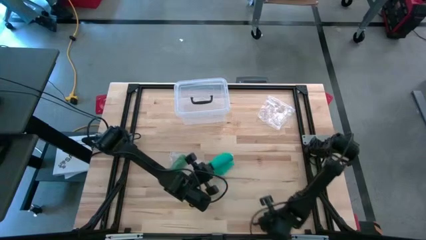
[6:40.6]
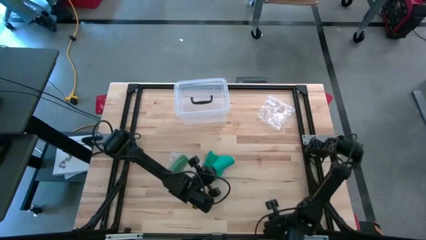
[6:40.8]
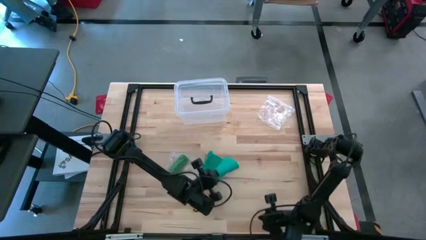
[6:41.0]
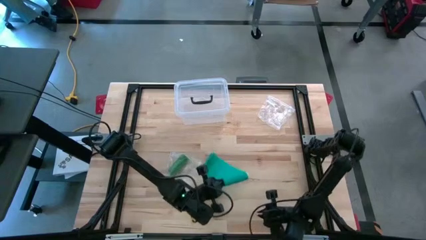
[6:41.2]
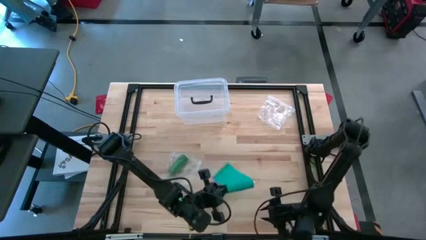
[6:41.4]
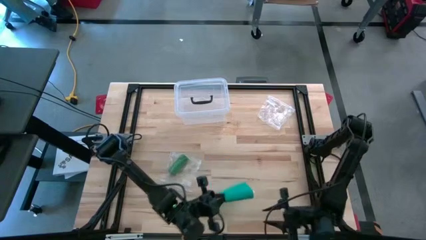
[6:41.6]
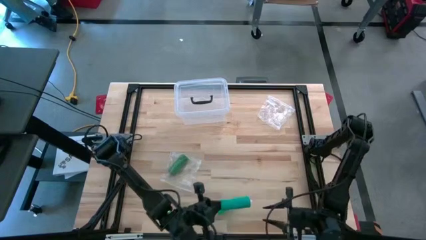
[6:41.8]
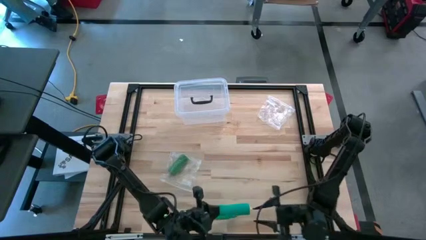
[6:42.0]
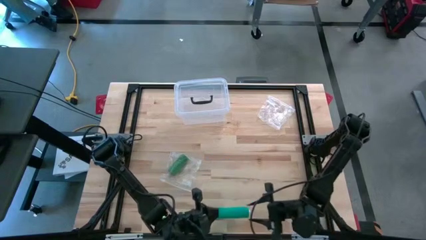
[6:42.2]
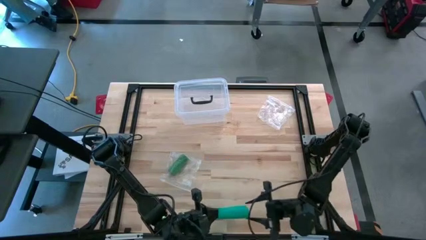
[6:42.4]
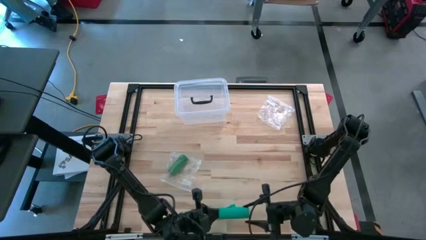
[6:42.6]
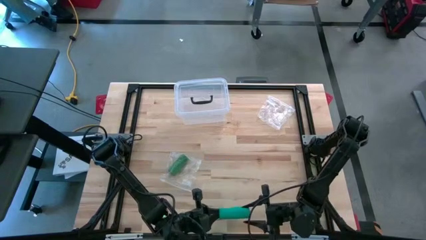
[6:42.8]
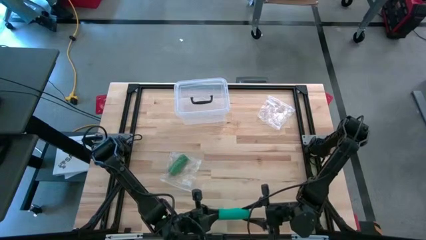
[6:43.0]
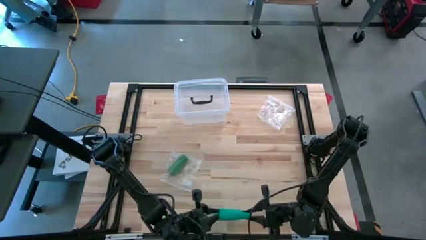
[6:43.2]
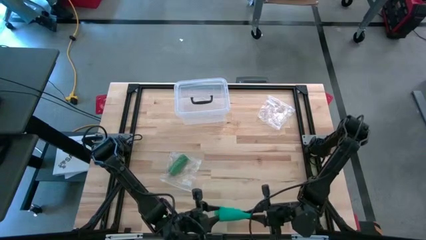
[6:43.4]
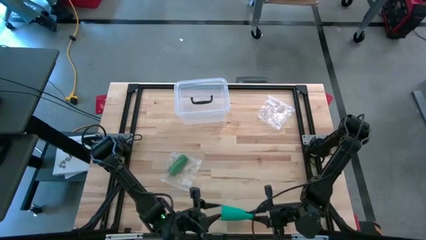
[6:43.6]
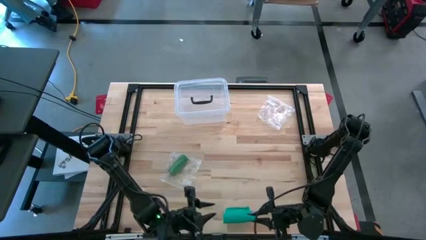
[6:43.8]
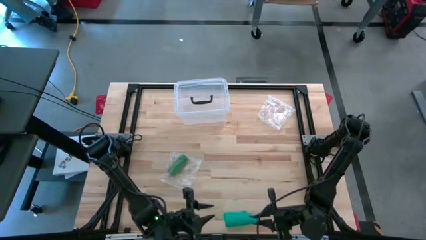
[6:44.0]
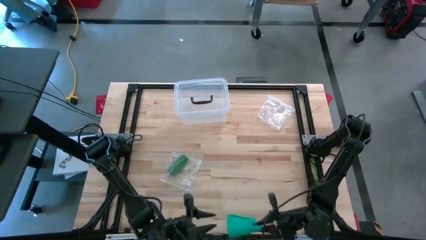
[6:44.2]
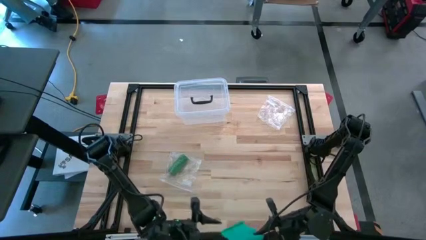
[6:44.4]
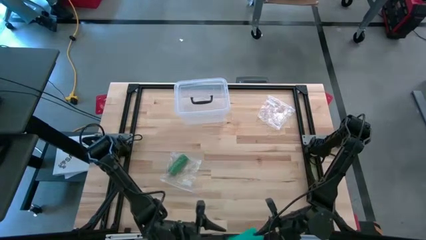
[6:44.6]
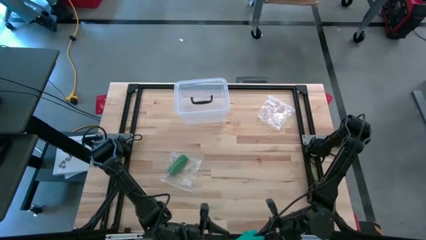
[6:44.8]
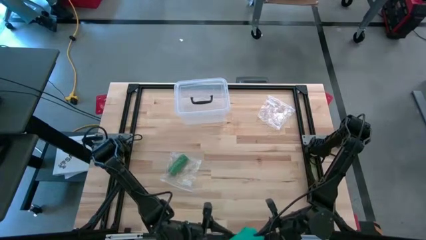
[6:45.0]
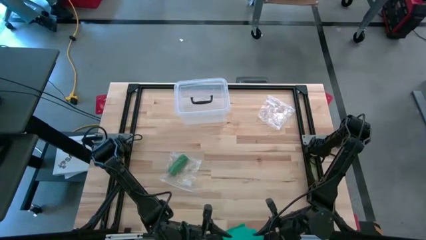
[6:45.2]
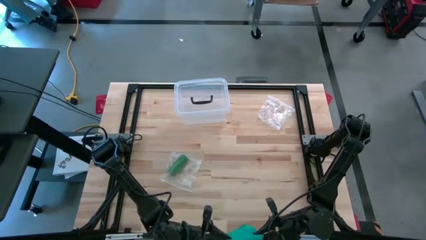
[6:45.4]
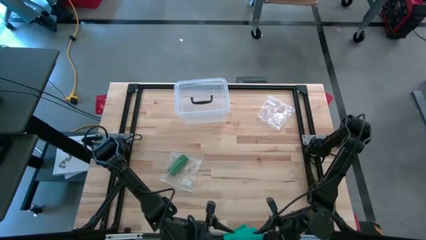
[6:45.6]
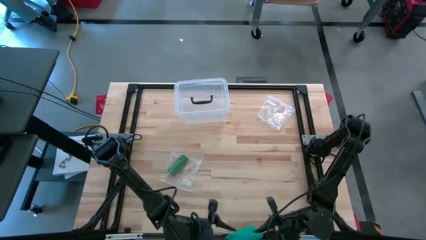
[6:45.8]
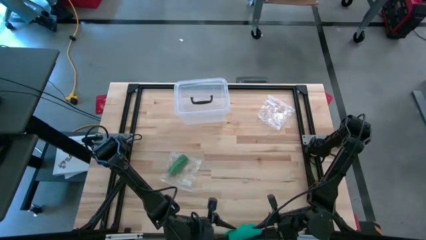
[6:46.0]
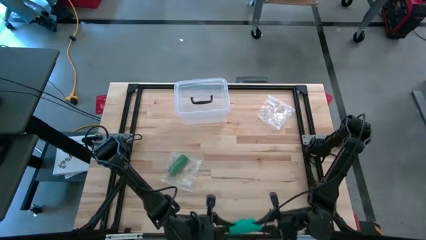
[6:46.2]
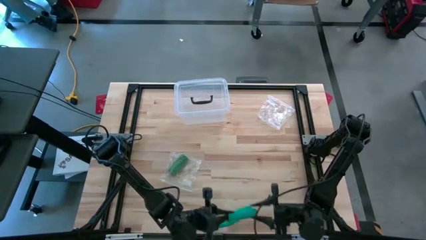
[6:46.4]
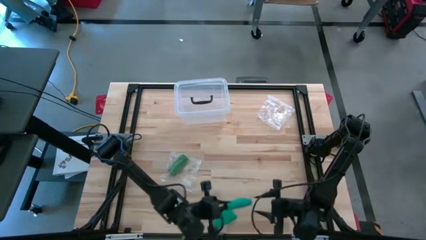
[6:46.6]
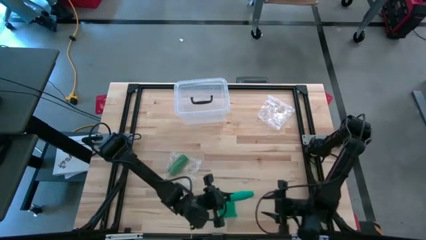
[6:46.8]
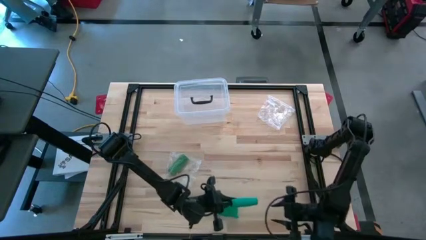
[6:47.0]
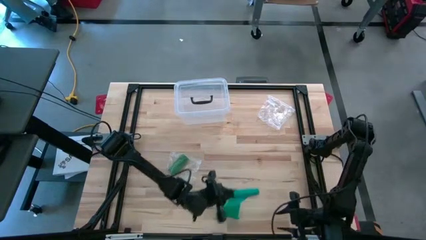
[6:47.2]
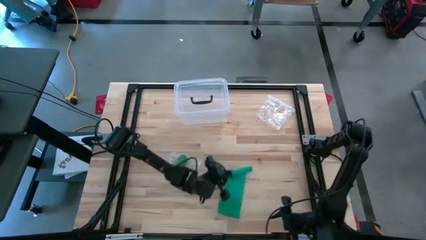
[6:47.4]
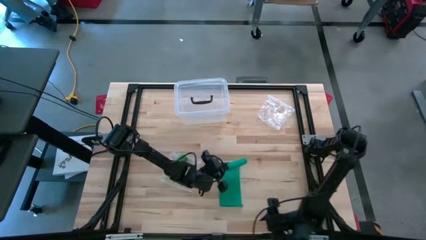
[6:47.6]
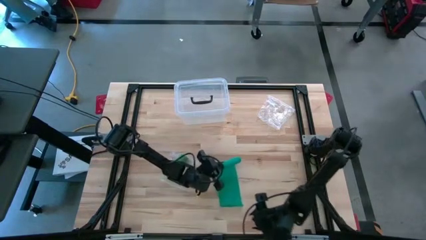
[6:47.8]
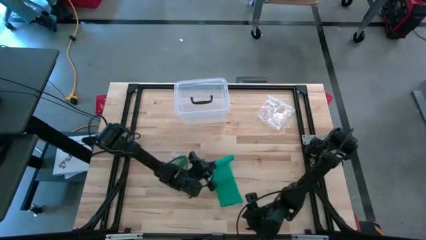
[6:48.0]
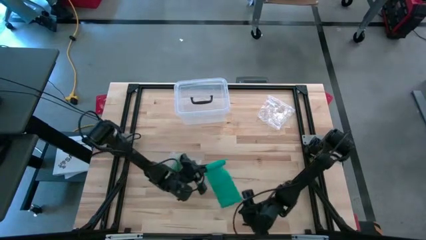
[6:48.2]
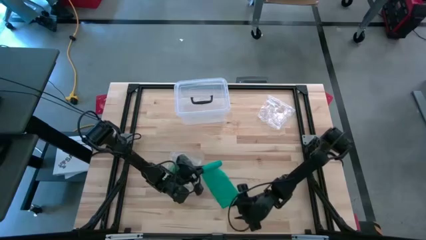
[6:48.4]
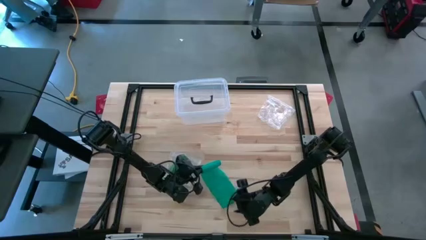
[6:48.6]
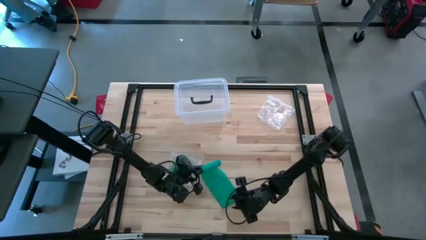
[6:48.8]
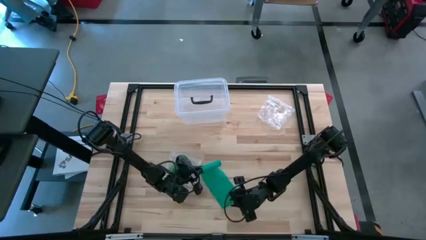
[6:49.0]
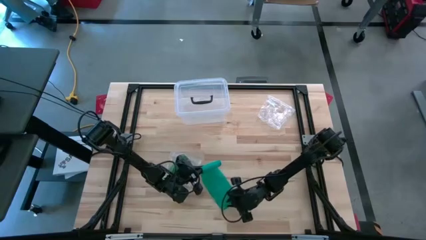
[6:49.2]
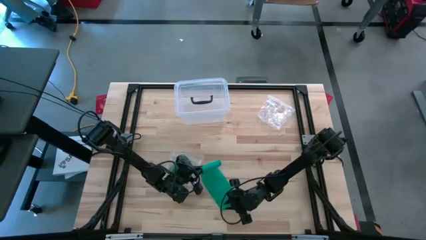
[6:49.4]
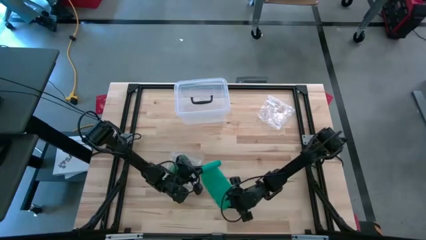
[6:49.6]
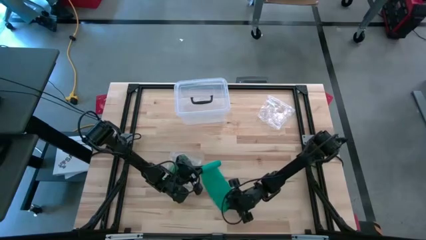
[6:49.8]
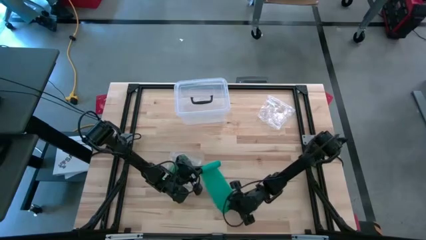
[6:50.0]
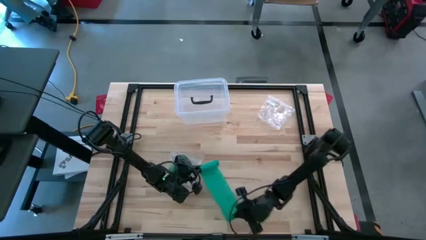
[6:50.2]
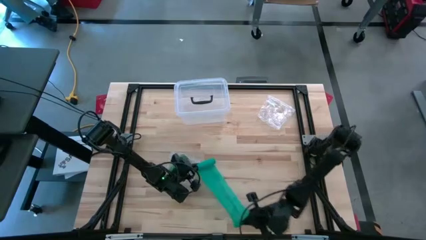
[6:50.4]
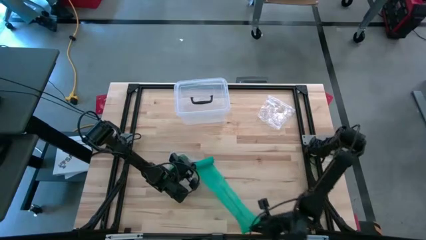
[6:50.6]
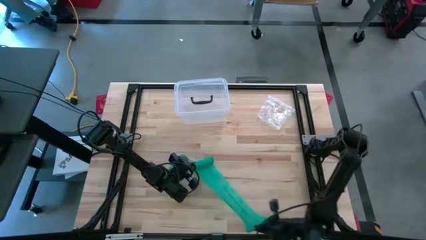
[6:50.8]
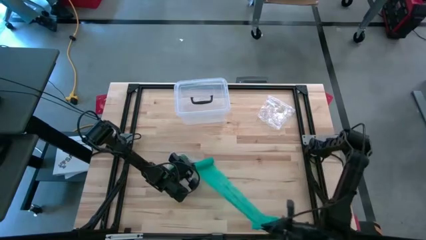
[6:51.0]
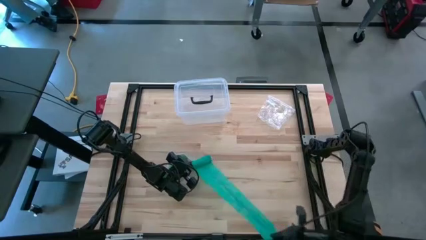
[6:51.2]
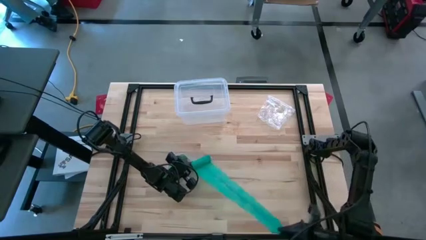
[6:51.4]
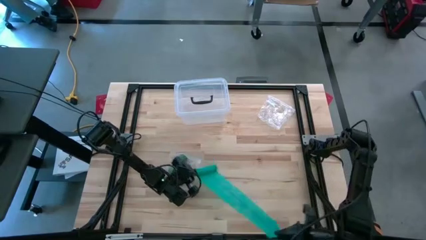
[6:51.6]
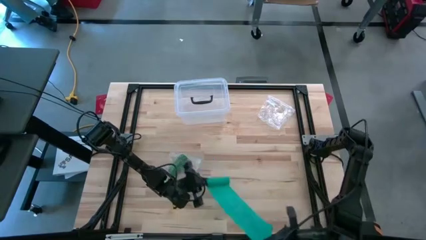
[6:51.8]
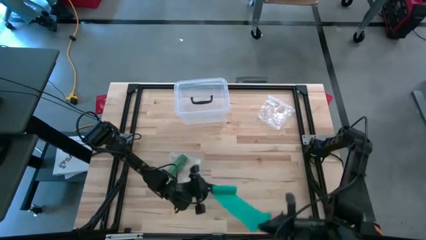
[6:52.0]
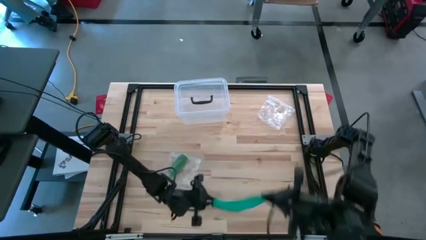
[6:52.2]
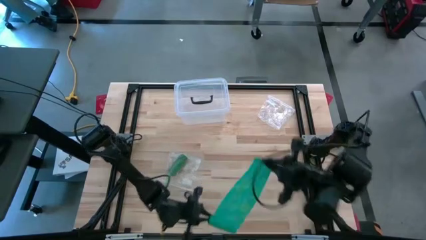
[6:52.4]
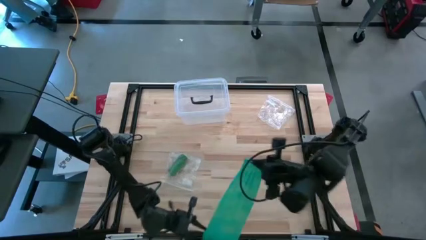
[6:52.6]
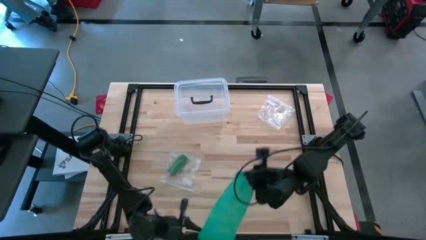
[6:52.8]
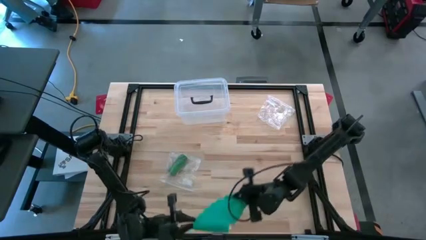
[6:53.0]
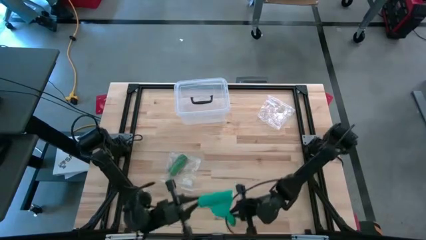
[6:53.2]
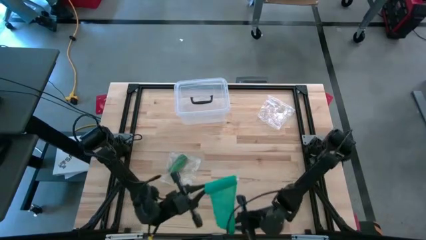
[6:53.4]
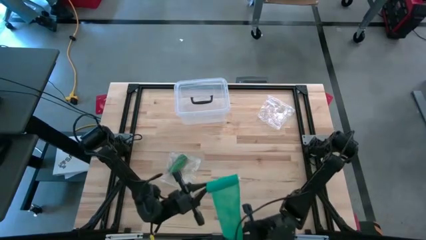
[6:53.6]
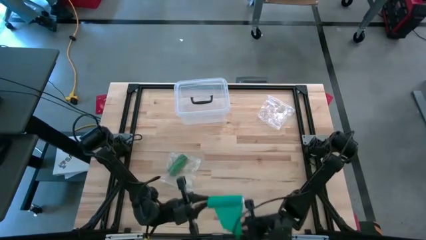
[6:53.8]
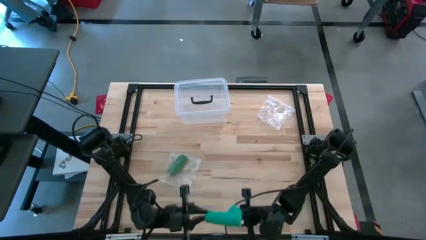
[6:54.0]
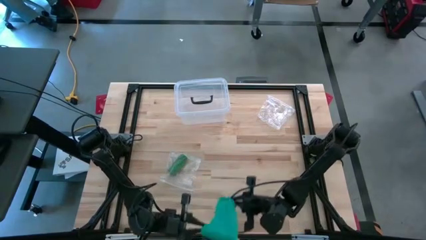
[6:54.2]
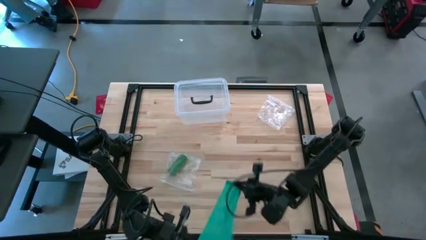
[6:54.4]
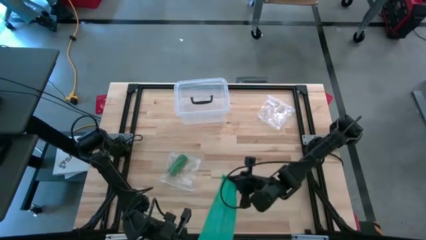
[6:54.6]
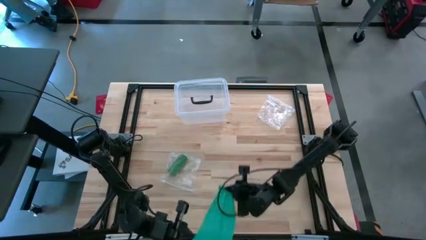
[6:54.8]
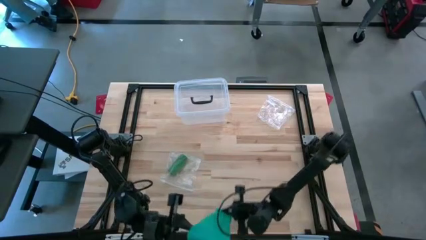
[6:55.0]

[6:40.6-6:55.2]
Task: Roll bandage
Roll the dark green bandage
